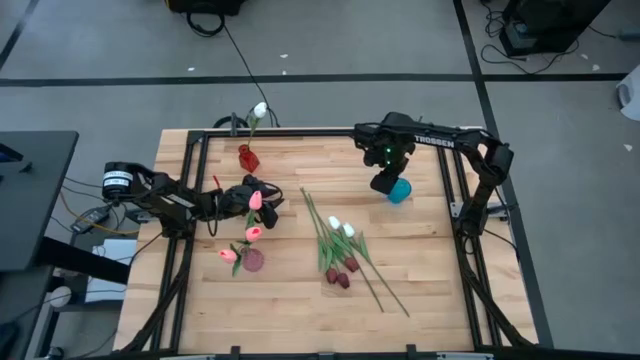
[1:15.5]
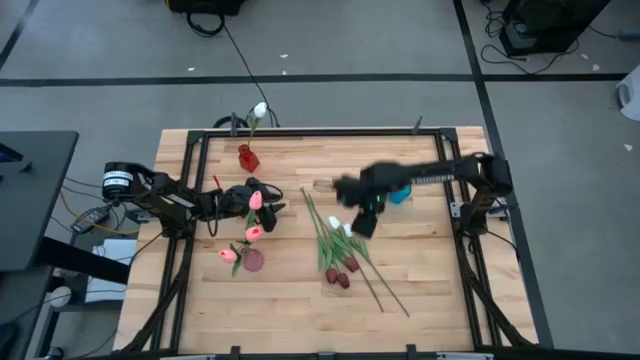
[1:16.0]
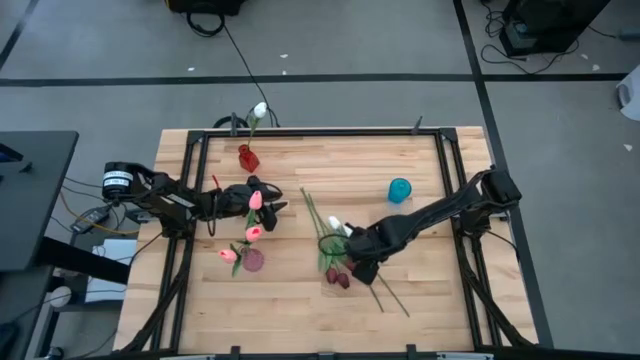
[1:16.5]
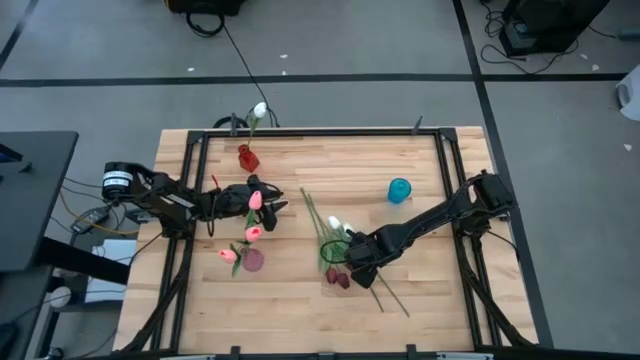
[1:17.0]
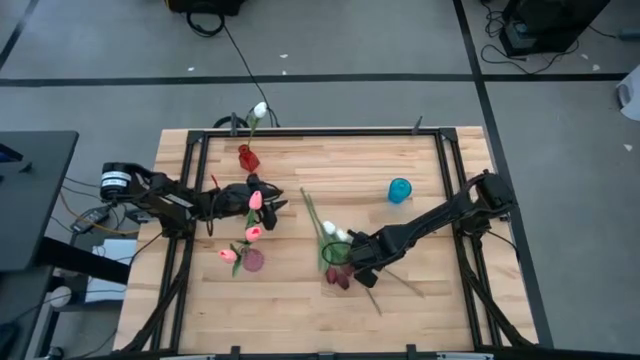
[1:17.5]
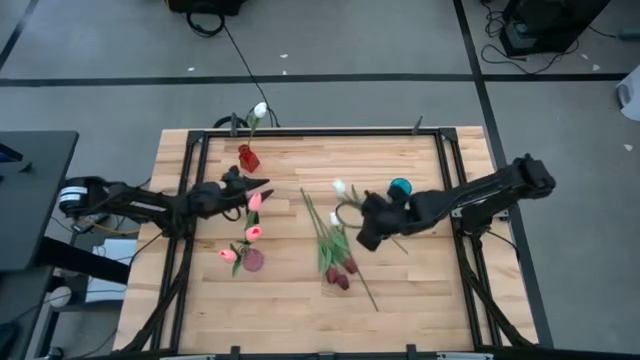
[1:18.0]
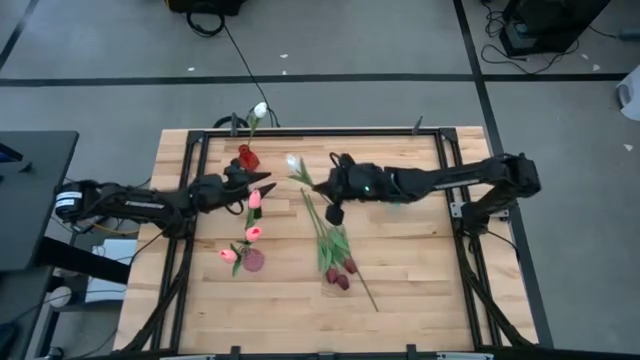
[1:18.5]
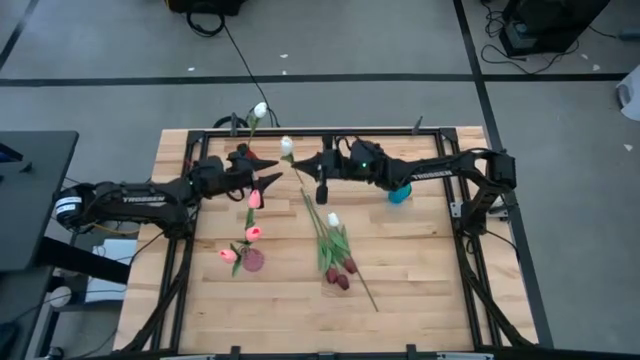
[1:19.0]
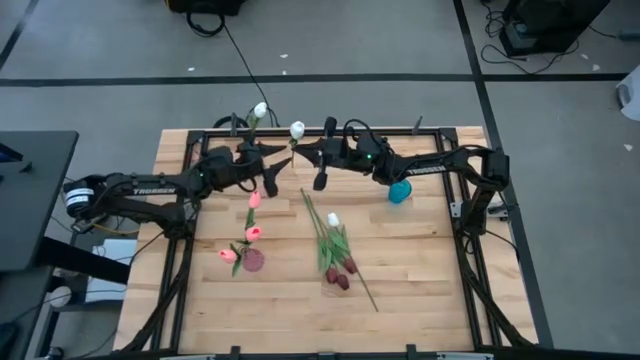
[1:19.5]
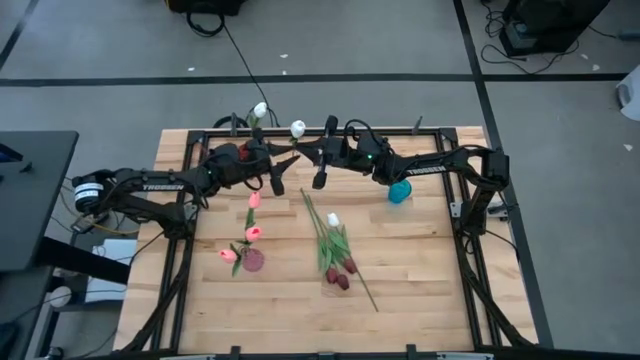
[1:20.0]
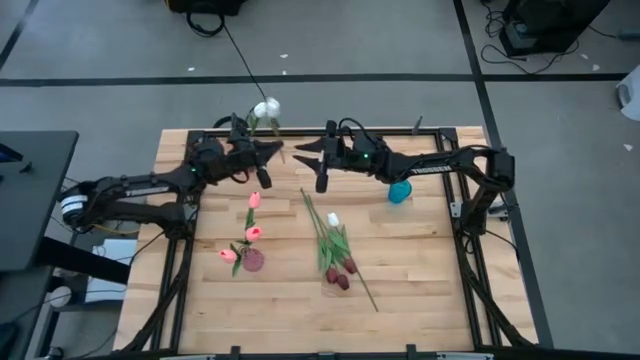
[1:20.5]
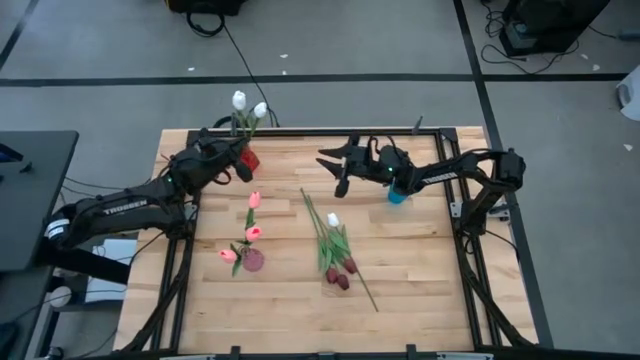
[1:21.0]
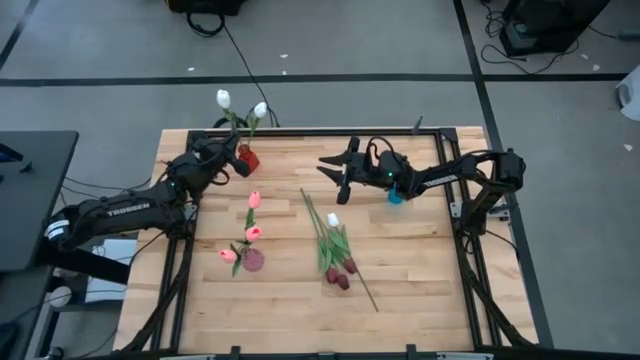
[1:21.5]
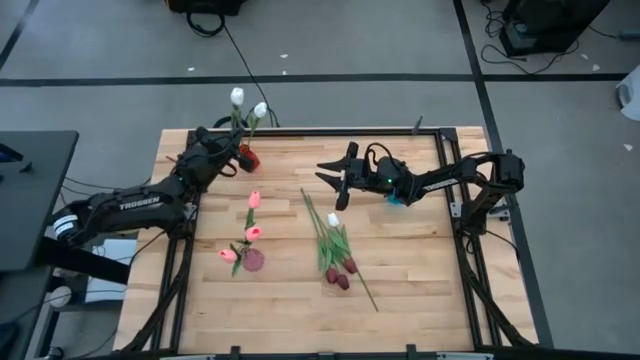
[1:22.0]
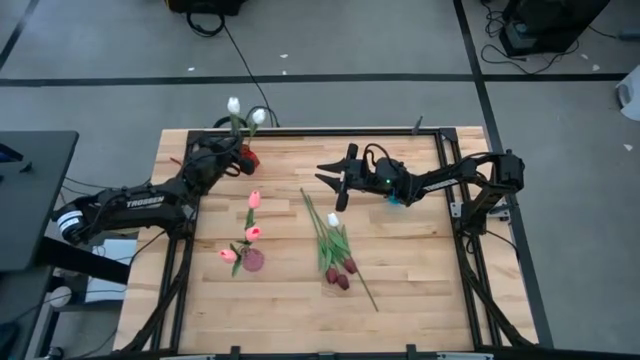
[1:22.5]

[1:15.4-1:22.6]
Task: Sort flowers into vase by color
Put the right white flower into the red vase

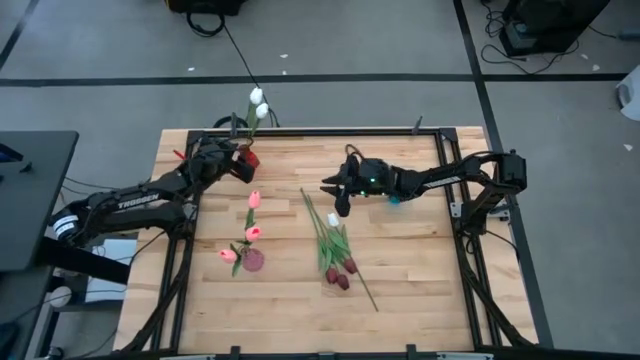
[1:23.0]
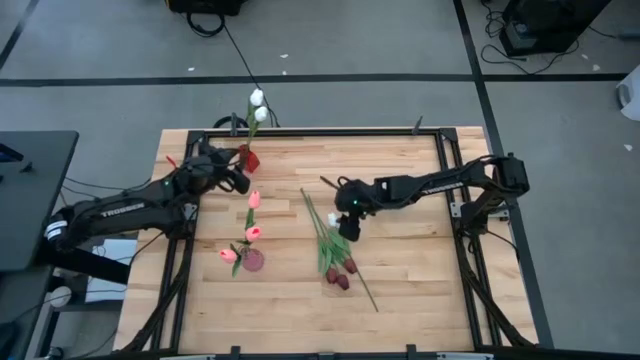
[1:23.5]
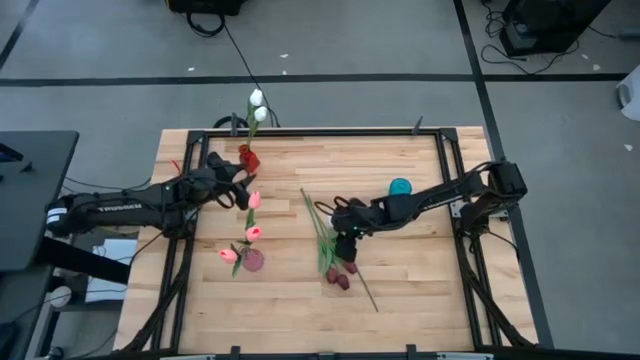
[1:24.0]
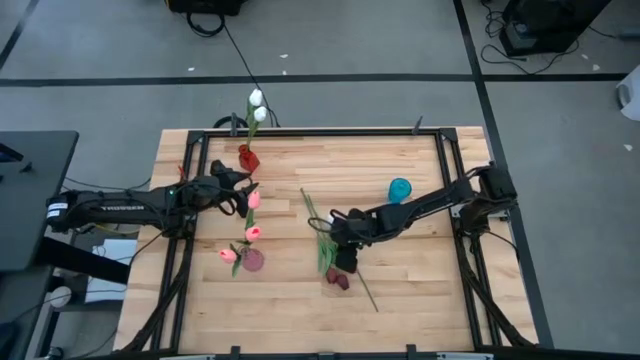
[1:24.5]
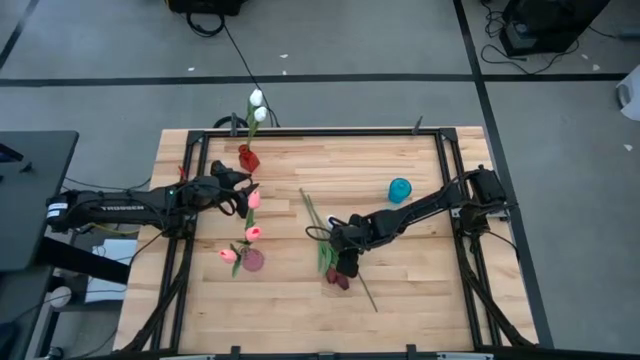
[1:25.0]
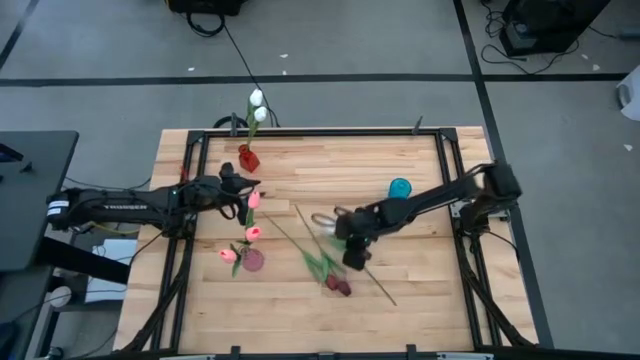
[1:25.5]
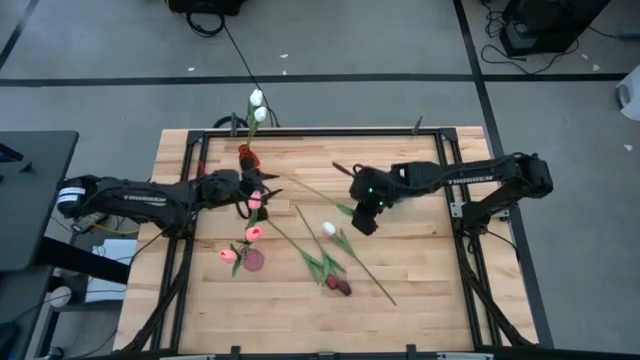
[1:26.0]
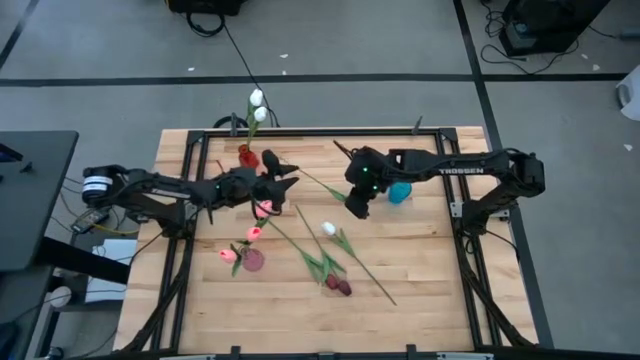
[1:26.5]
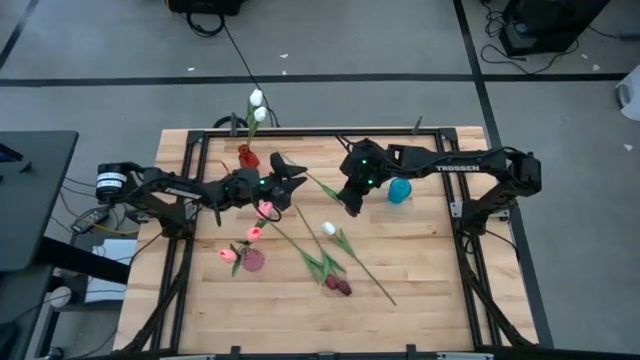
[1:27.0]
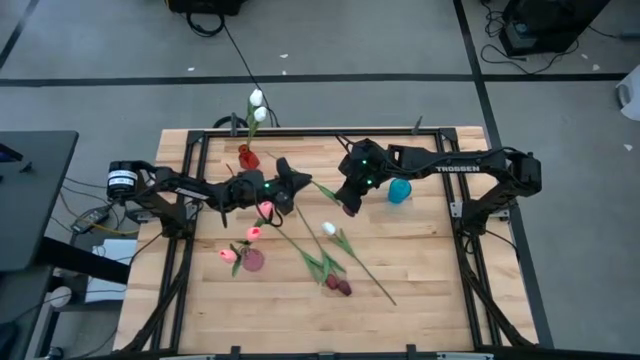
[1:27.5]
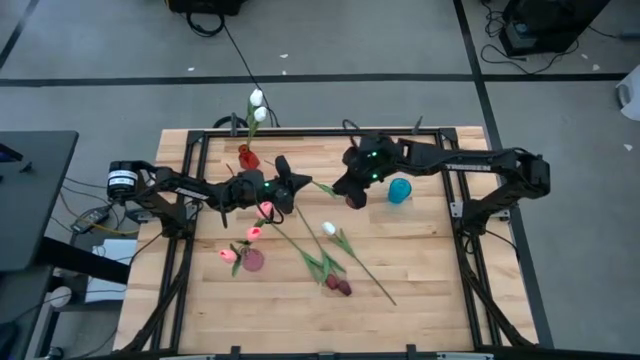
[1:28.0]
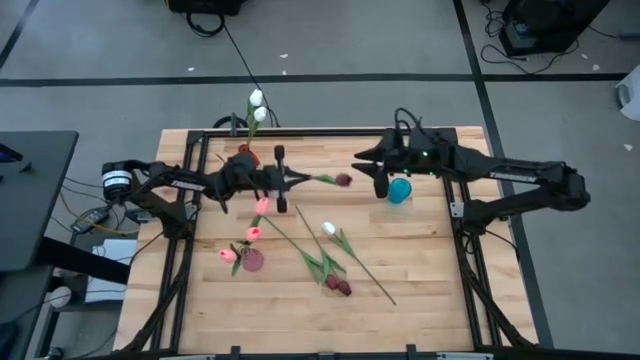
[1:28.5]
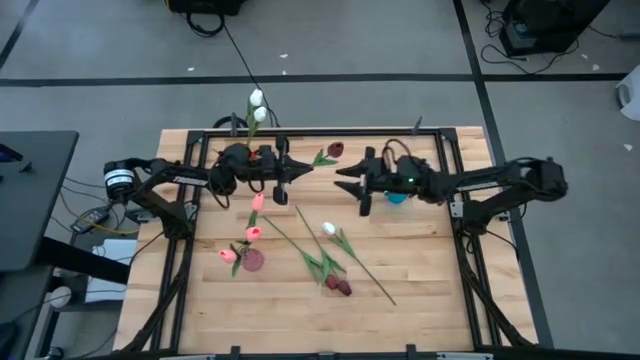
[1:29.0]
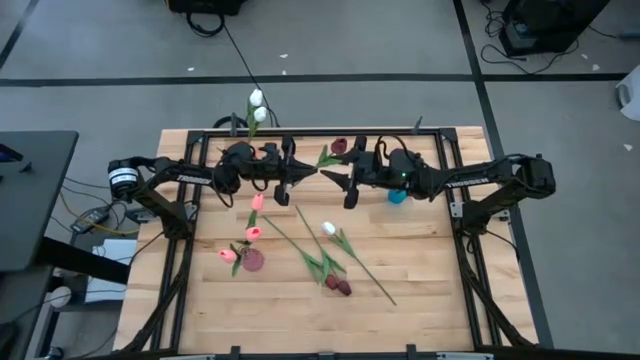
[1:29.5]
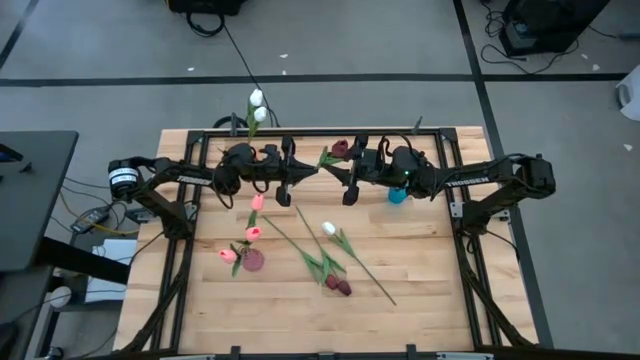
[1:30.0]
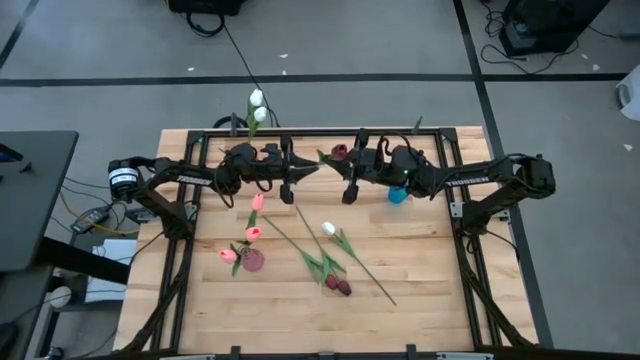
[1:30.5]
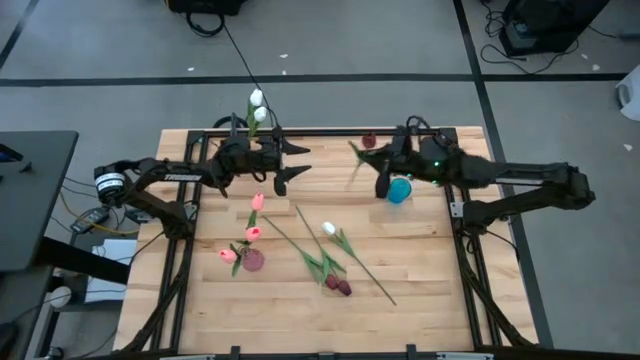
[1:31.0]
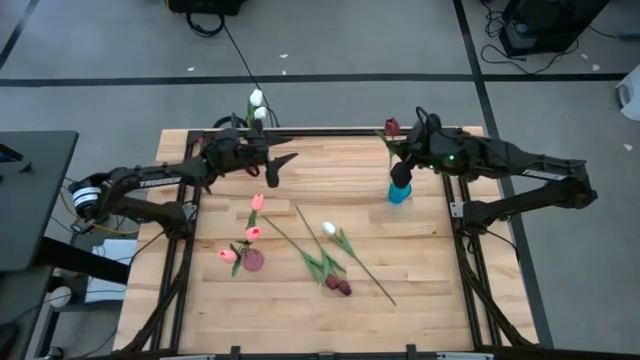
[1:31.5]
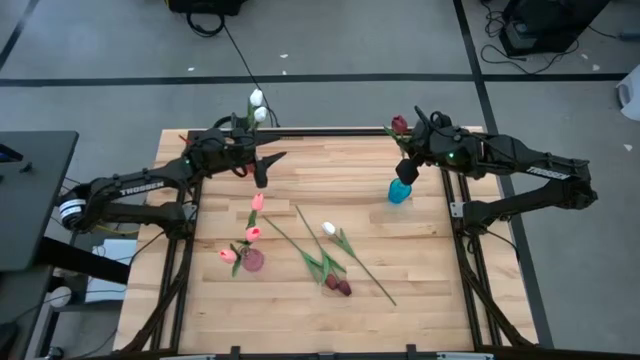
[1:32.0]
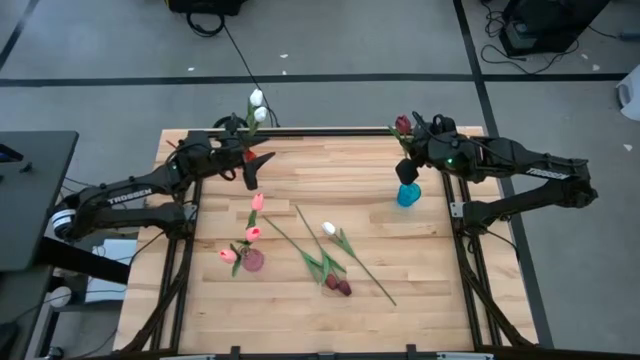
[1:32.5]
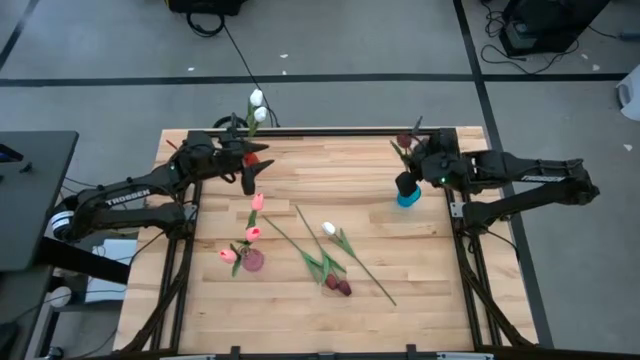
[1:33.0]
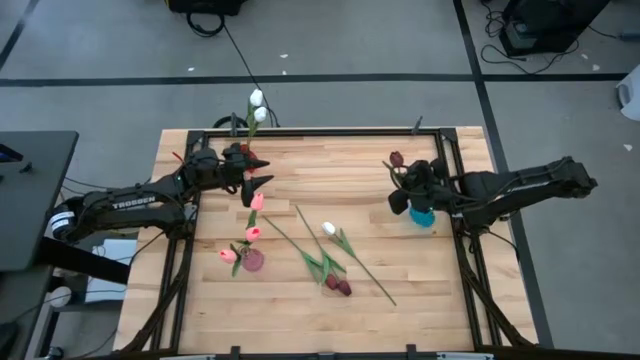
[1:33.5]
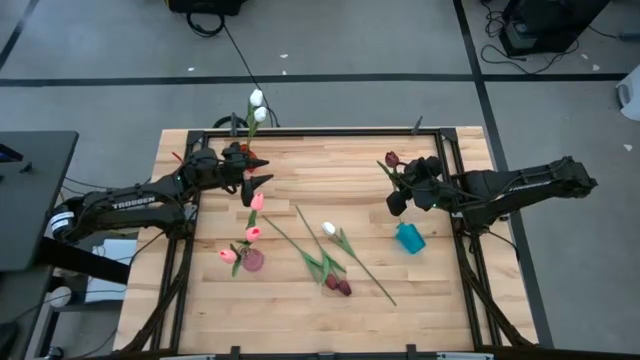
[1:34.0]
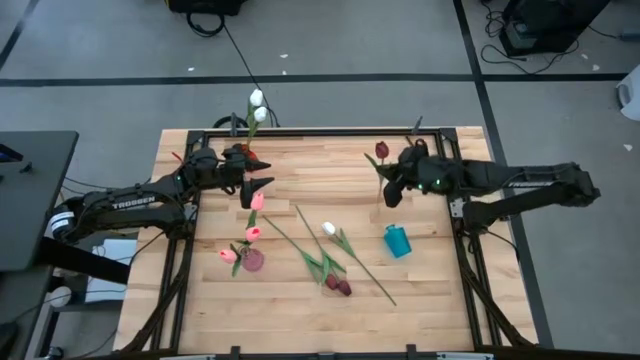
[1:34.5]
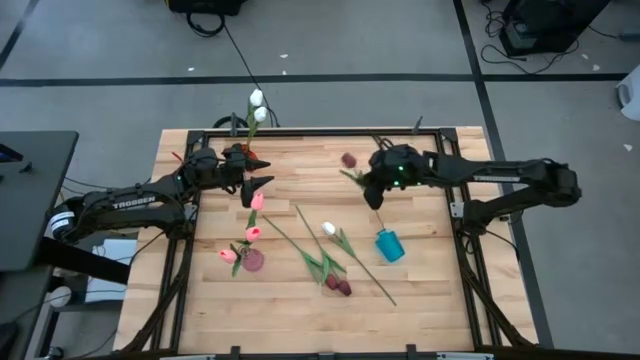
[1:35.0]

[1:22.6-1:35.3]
Put the right red flower into the blue vase

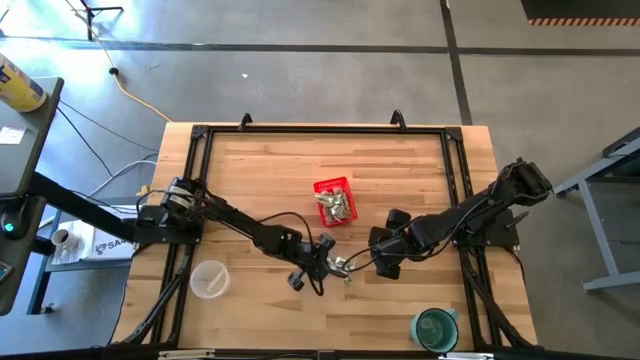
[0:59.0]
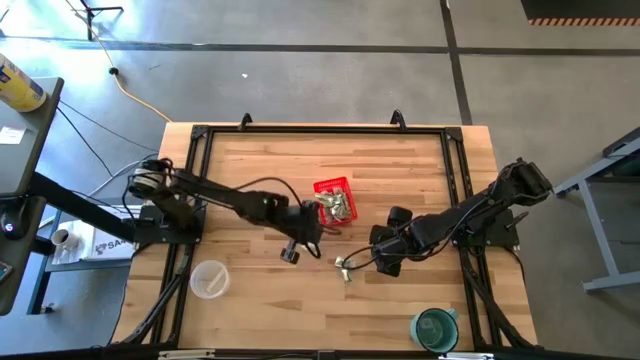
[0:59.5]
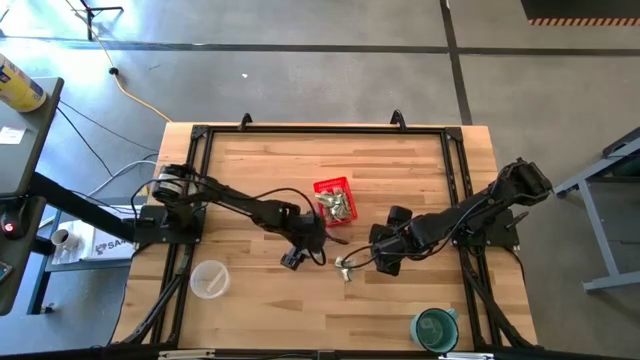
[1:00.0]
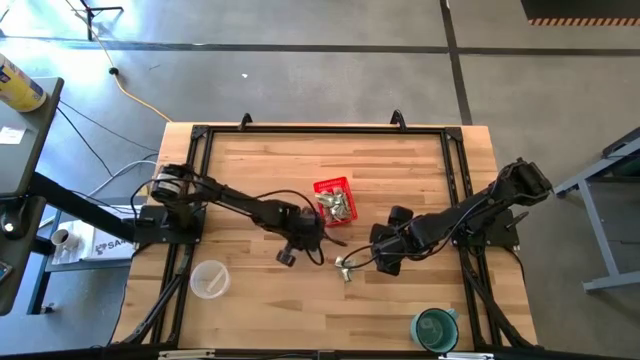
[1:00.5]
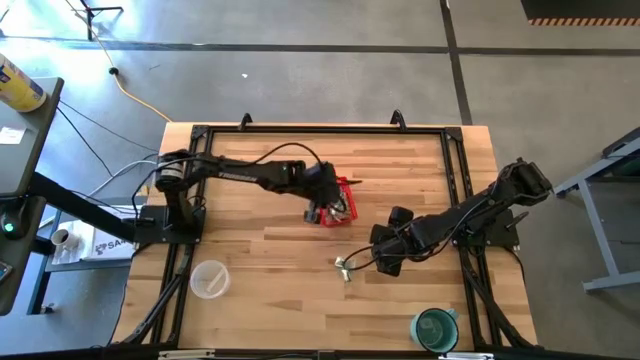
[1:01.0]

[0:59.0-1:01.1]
Task: Pick and place items into bin
Put the light green stevia packet into the red bin

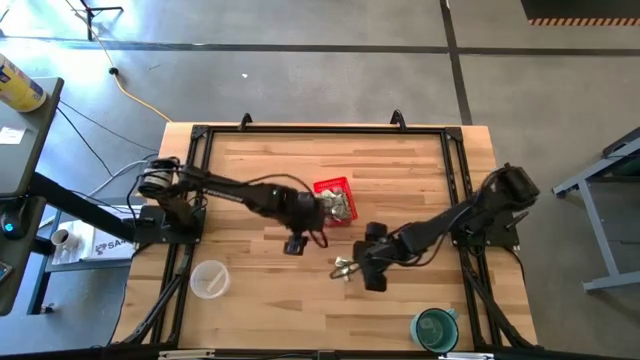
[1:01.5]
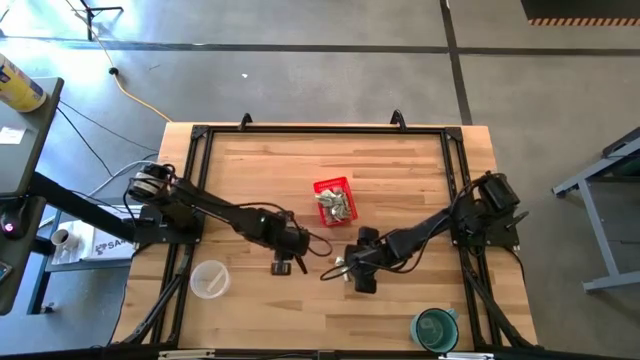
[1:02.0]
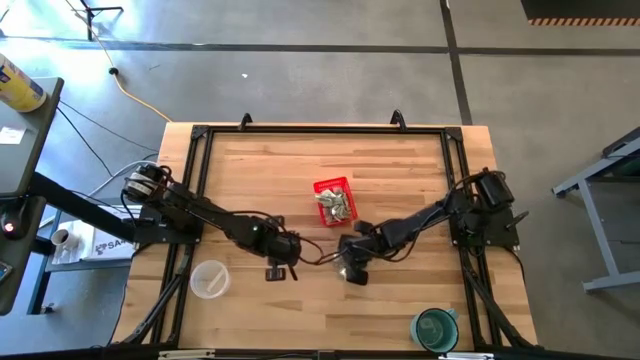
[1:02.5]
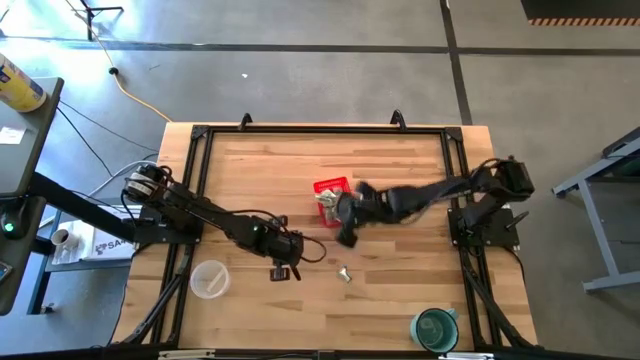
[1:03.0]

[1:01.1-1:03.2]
Put the light green stevia packet into the red bin
